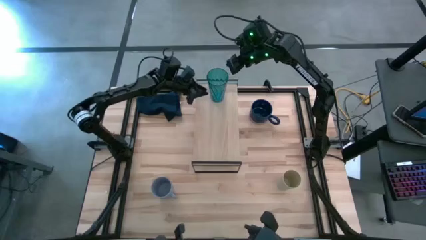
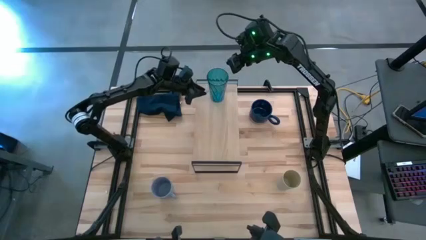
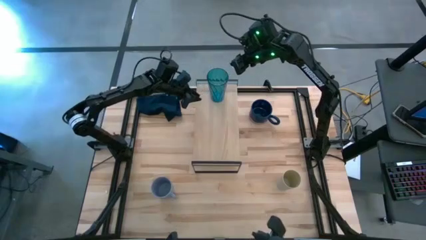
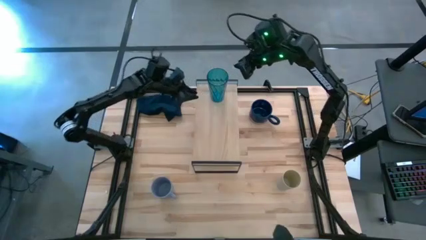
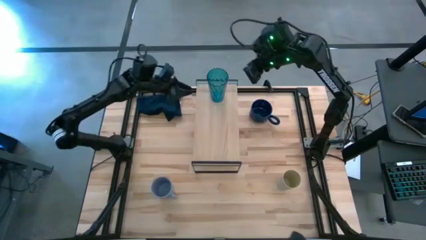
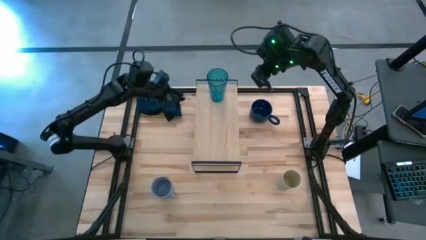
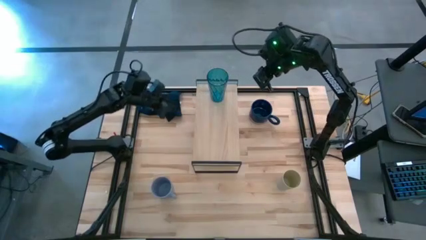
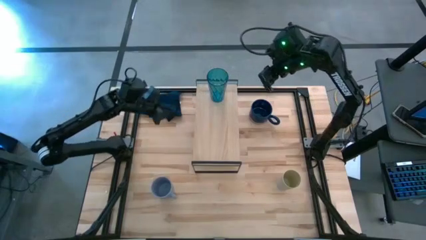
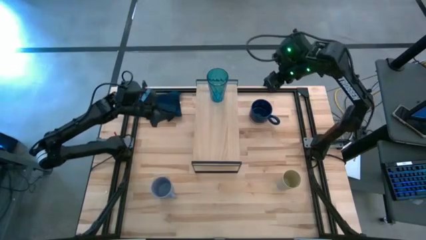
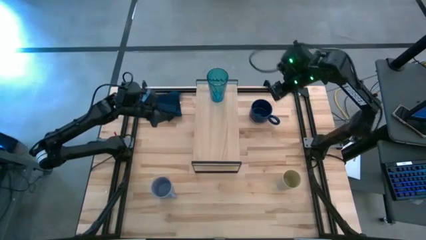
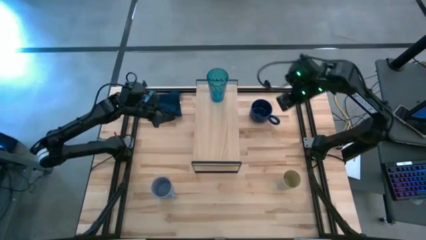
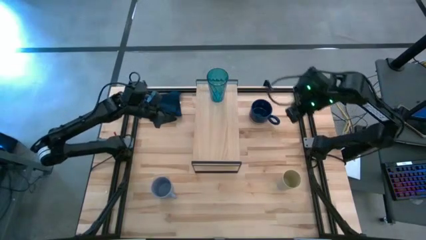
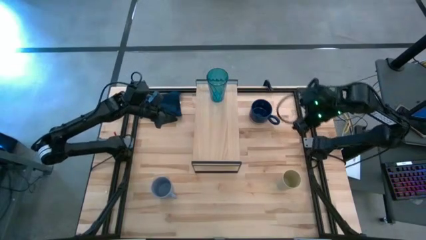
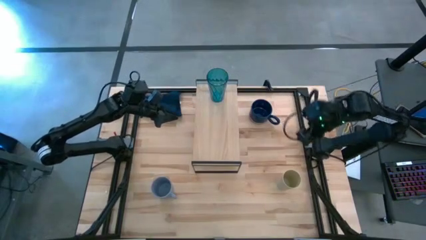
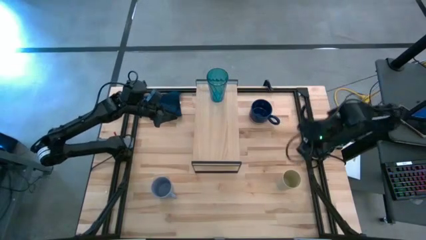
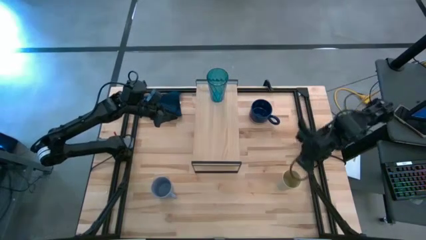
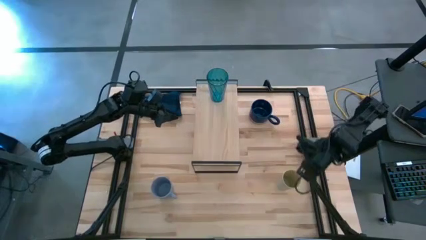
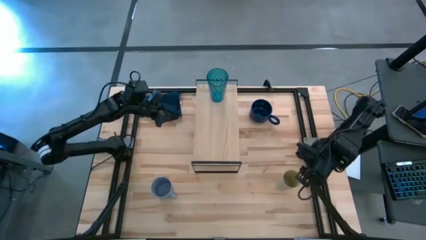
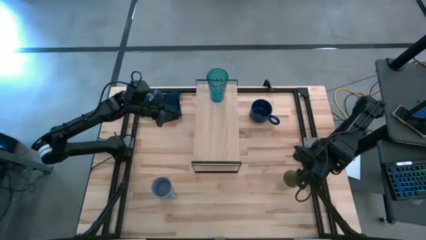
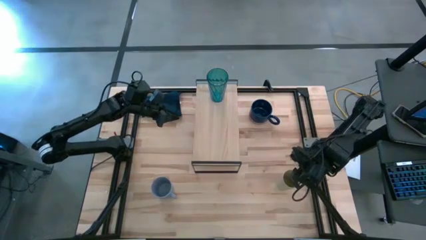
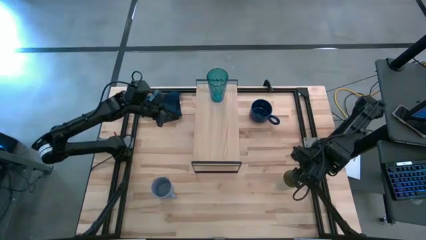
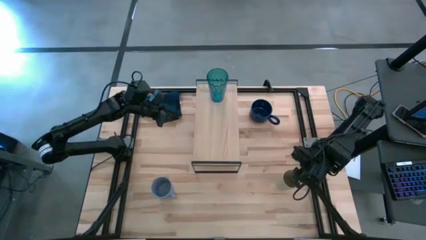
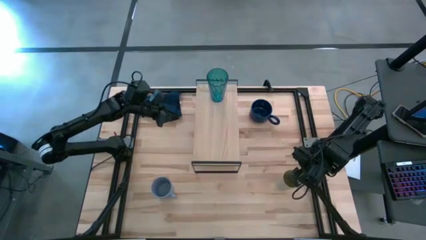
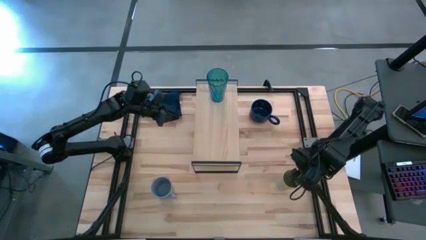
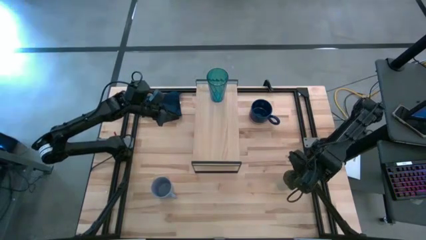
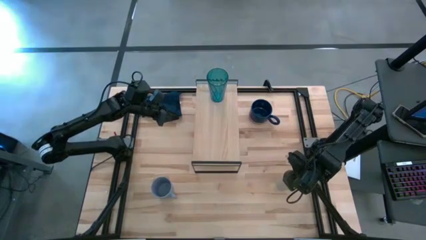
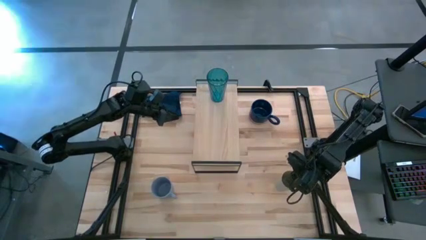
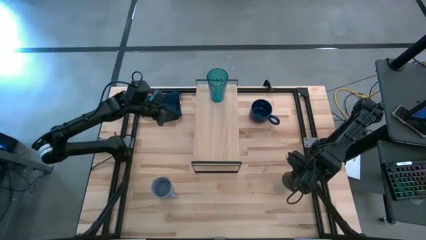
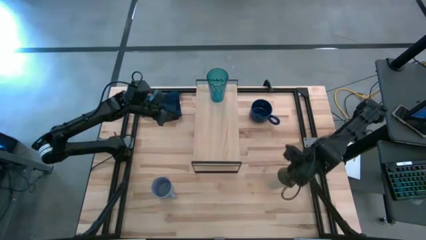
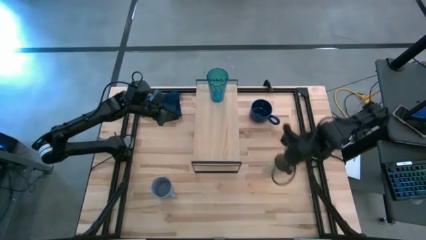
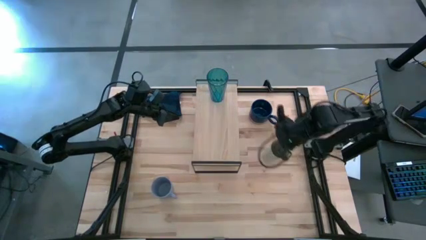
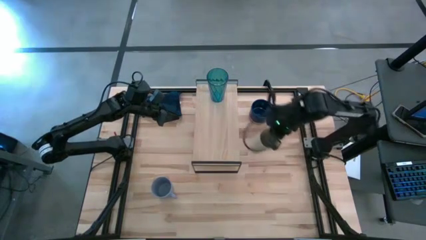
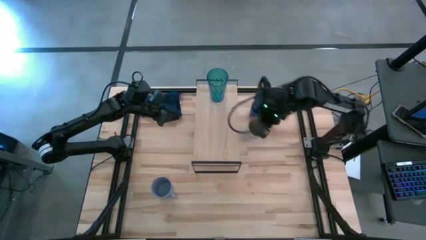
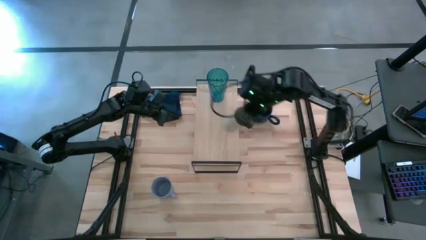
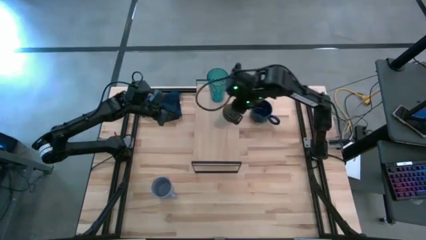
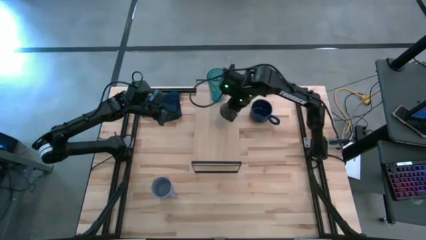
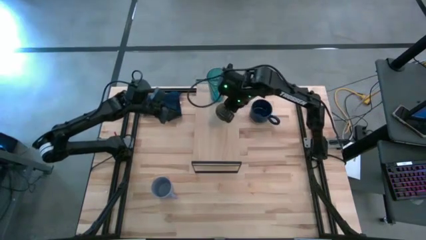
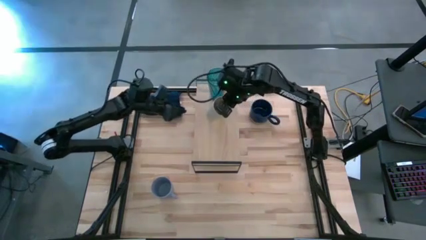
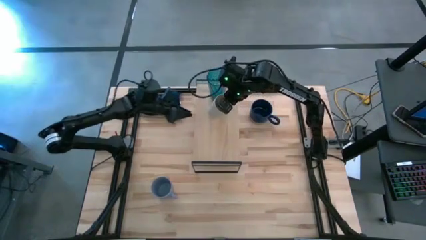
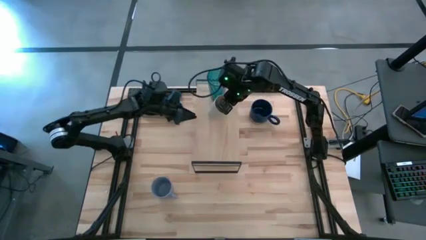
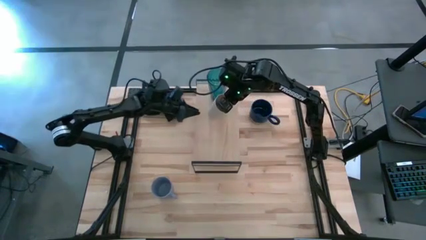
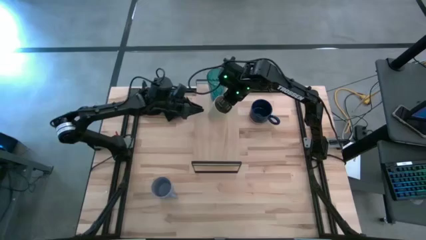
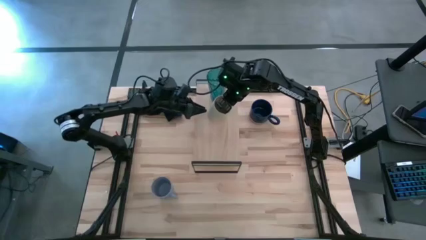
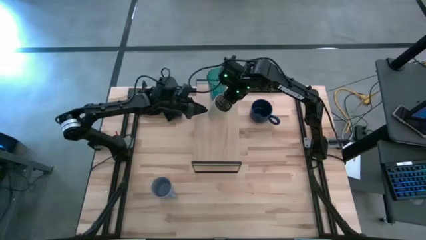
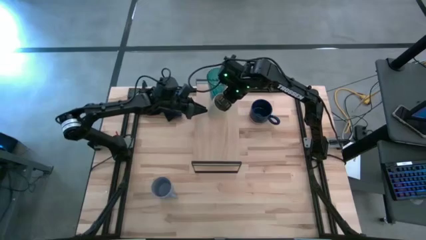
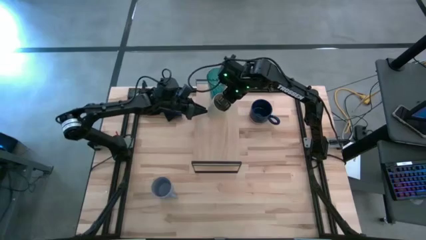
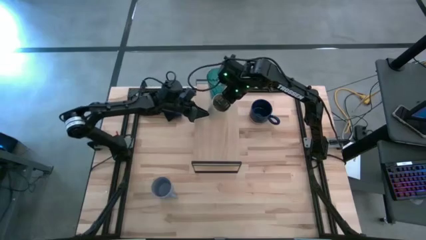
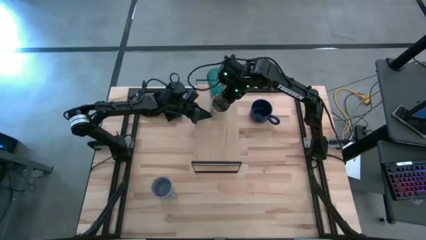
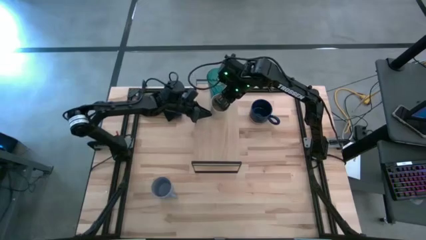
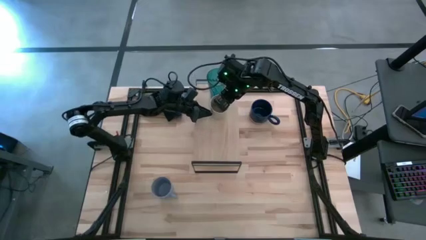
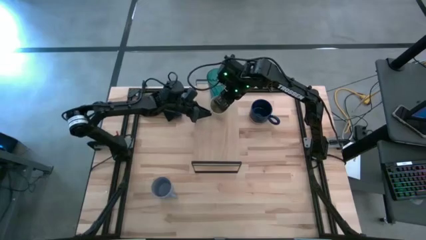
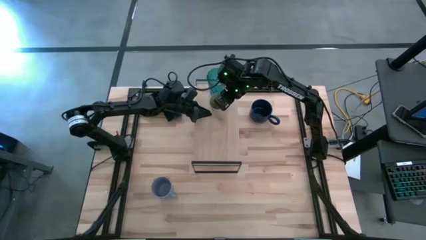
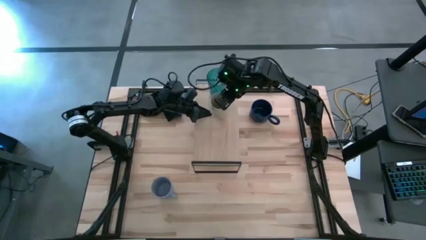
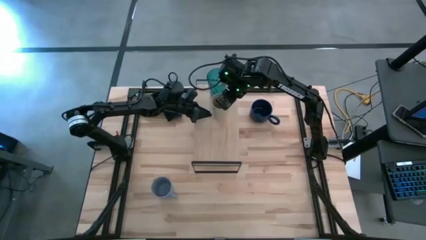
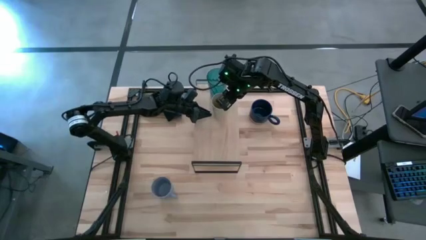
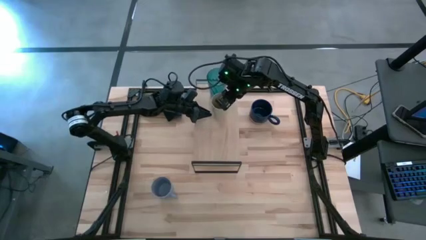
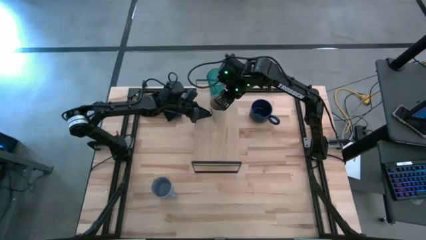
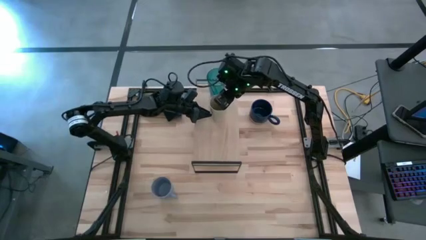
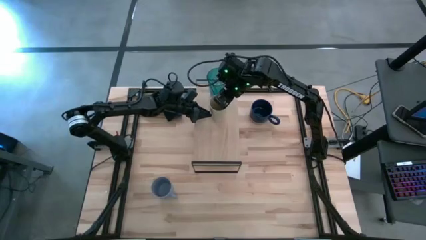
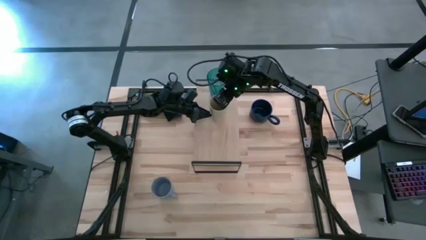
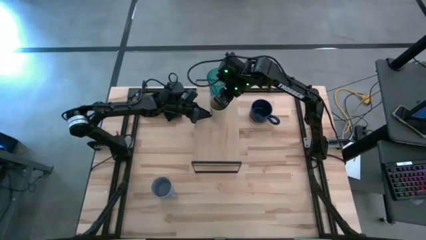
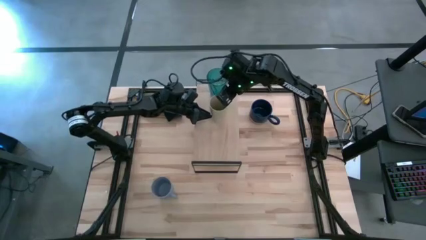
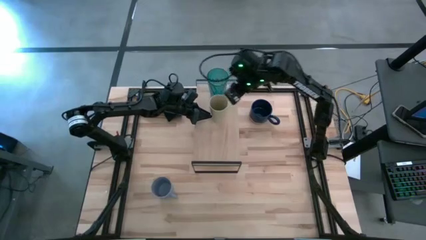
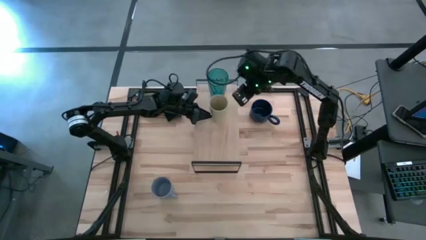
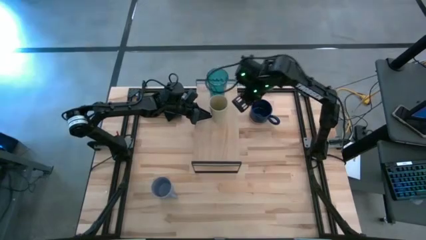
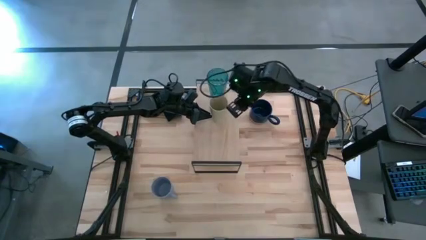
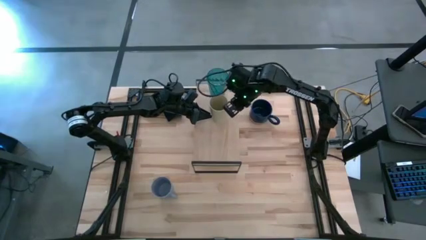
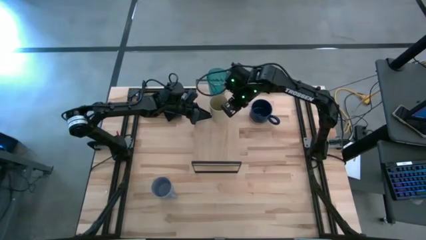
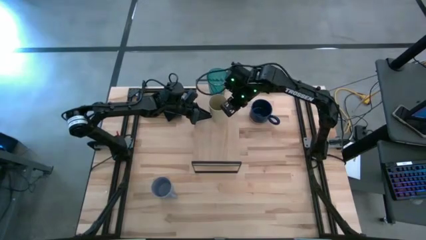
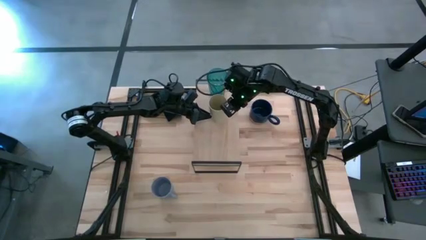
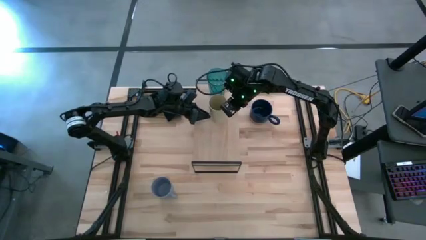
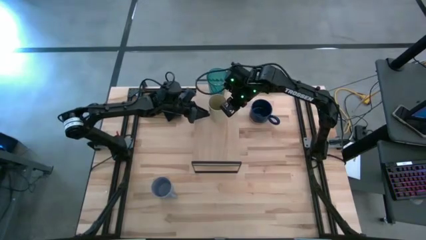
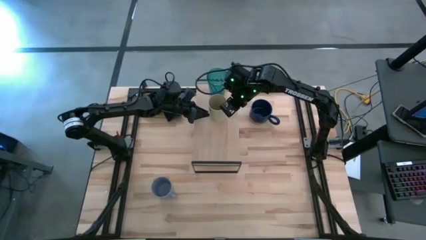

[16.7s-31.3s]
Task: Stack small to large cups/mugs on shelf
Put the light yellow cup on the shelf
